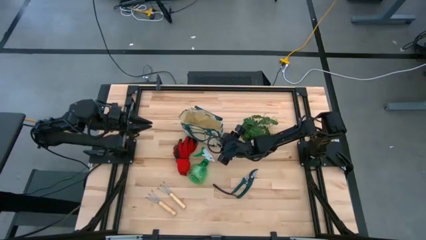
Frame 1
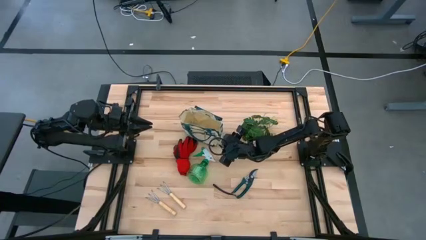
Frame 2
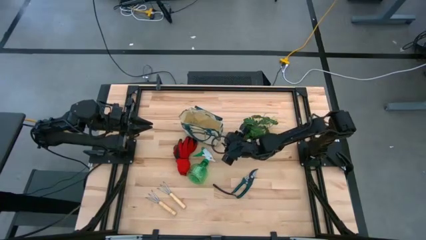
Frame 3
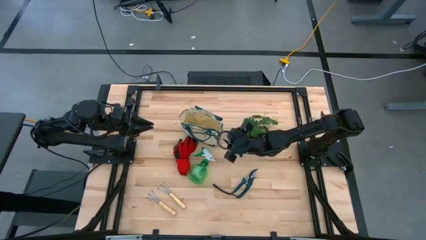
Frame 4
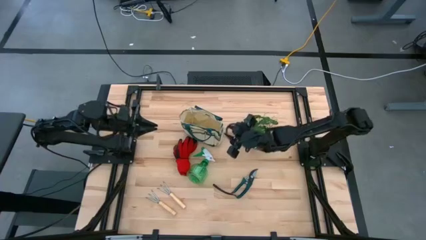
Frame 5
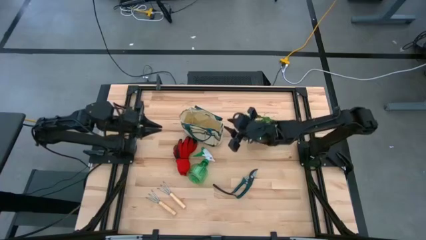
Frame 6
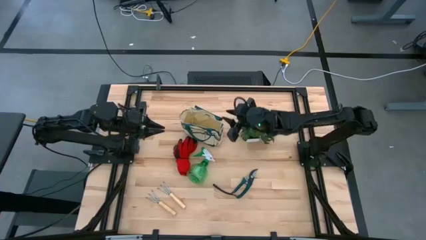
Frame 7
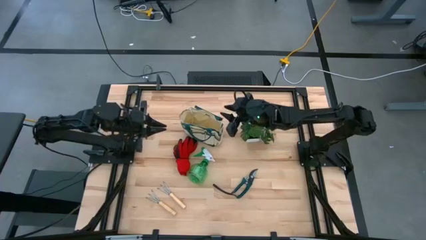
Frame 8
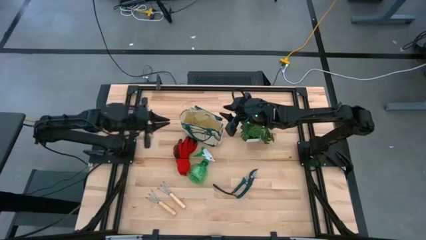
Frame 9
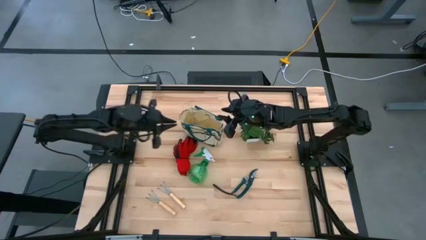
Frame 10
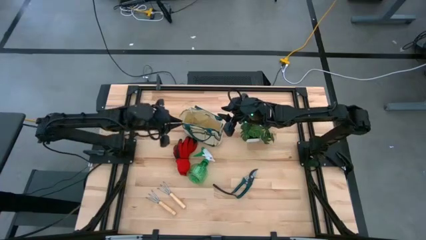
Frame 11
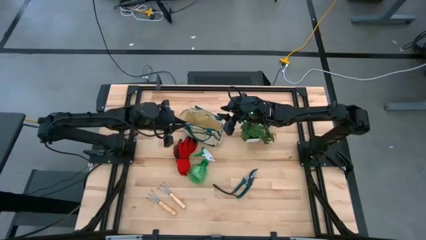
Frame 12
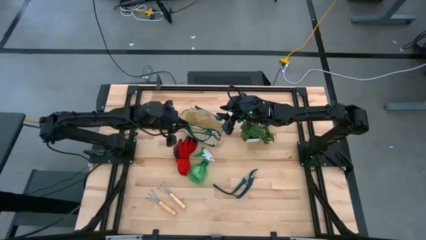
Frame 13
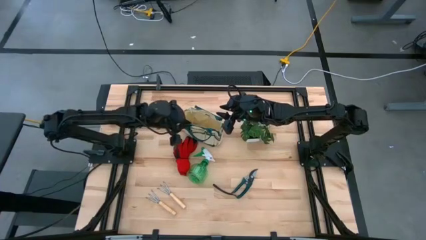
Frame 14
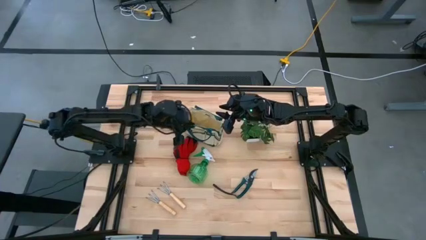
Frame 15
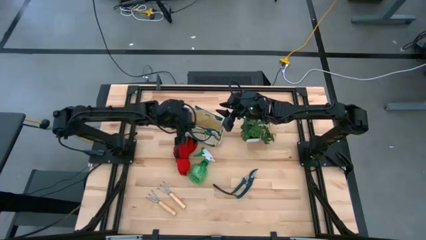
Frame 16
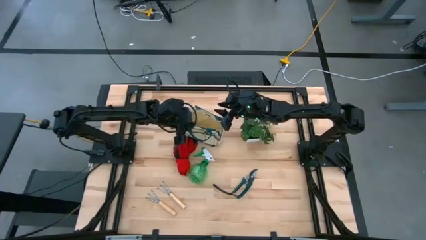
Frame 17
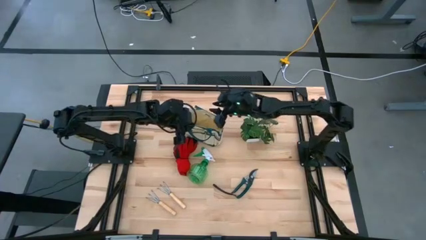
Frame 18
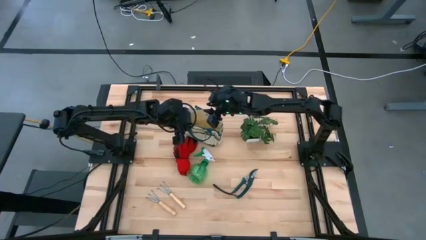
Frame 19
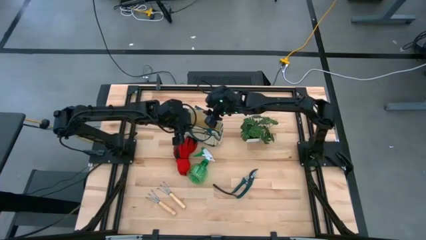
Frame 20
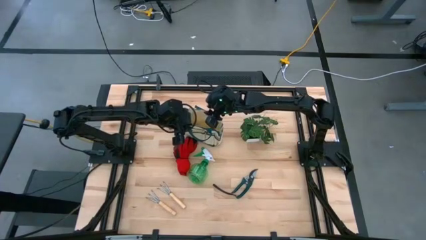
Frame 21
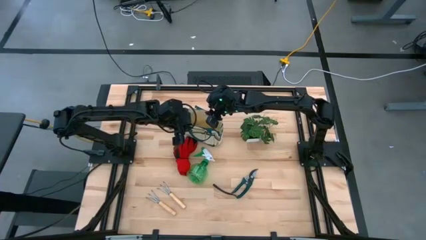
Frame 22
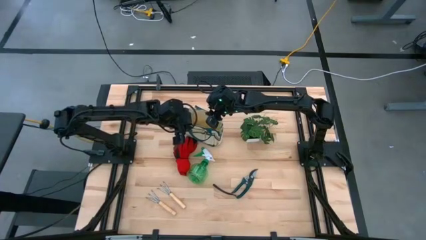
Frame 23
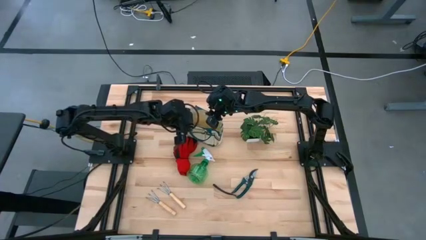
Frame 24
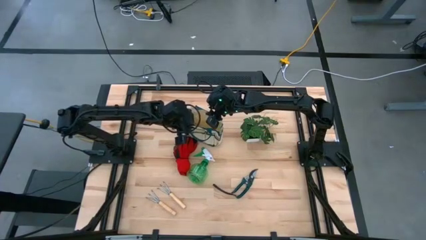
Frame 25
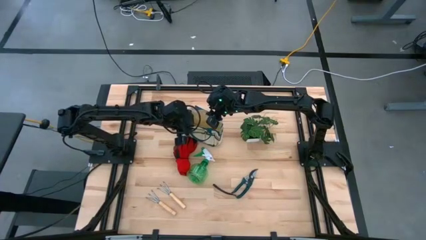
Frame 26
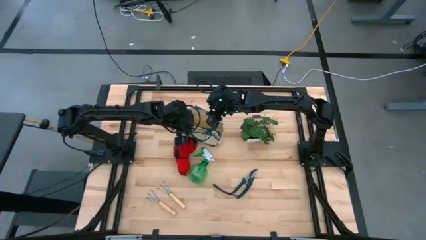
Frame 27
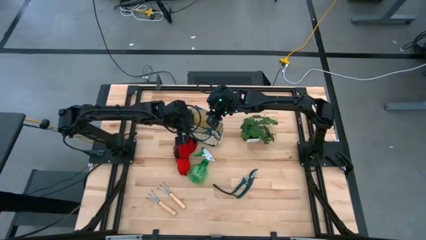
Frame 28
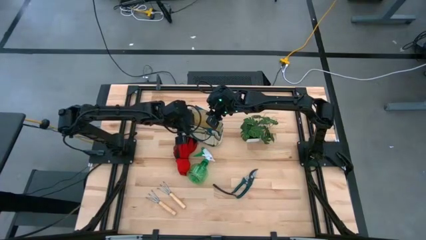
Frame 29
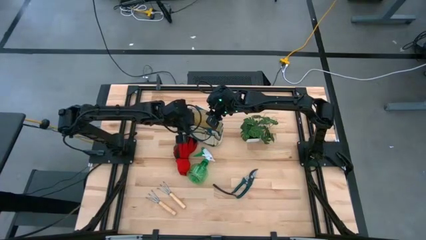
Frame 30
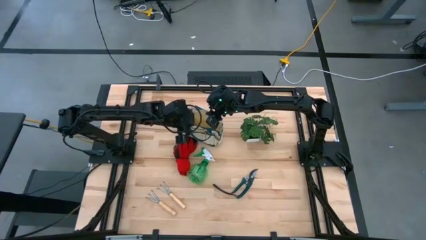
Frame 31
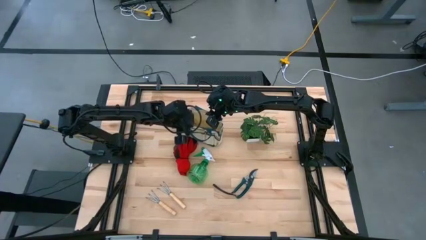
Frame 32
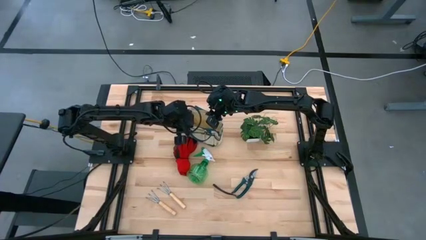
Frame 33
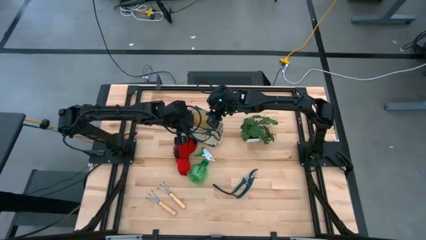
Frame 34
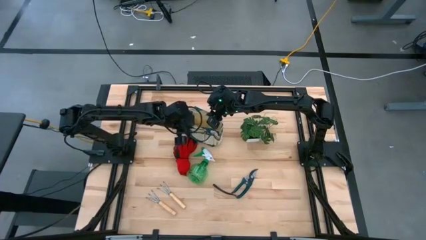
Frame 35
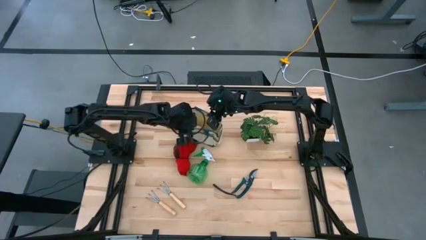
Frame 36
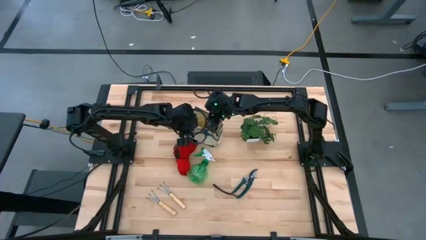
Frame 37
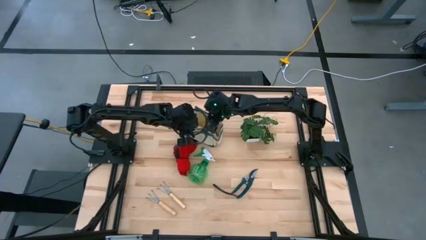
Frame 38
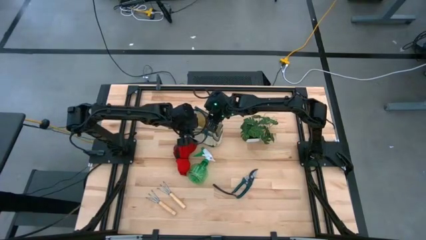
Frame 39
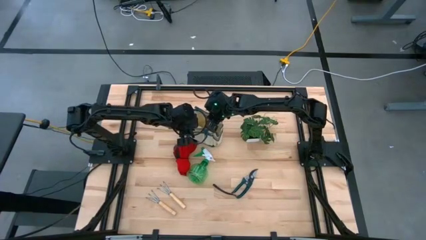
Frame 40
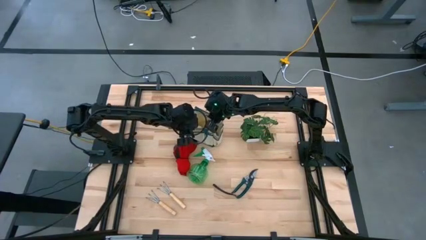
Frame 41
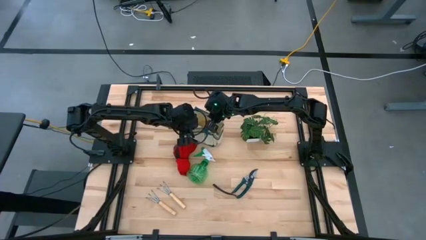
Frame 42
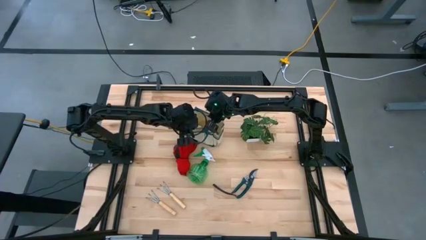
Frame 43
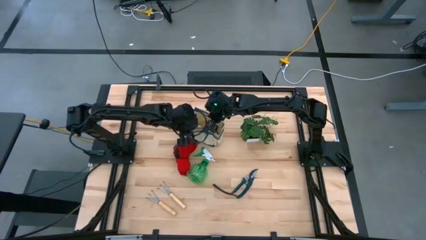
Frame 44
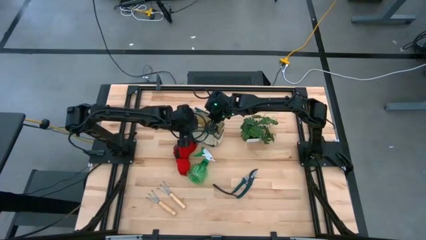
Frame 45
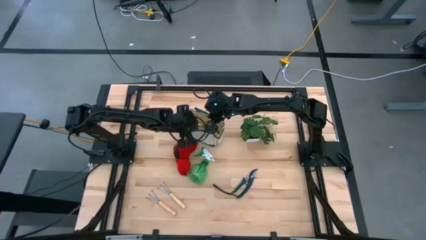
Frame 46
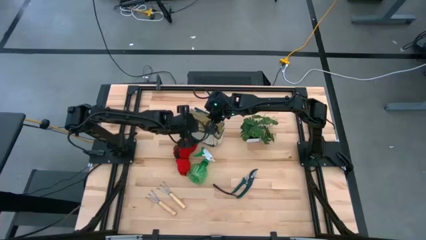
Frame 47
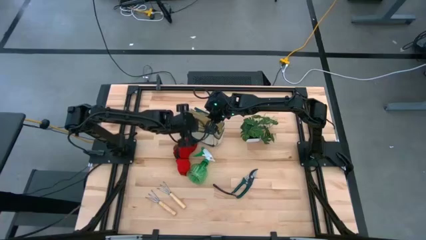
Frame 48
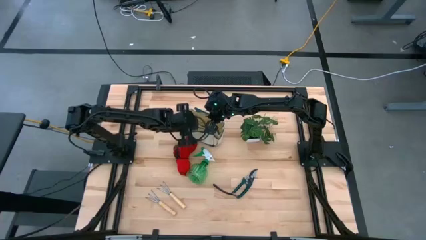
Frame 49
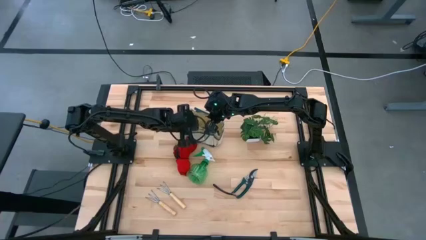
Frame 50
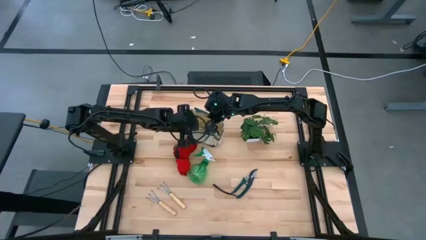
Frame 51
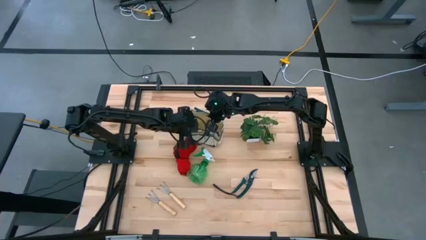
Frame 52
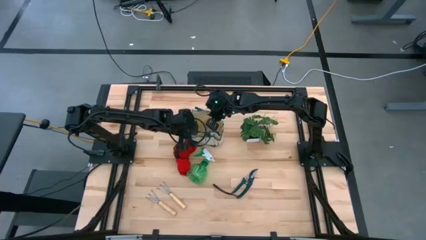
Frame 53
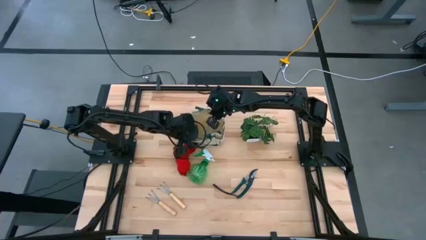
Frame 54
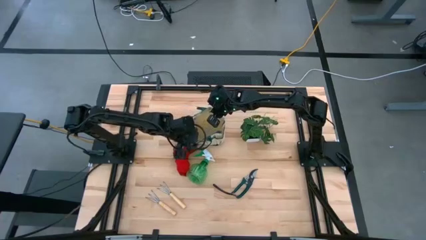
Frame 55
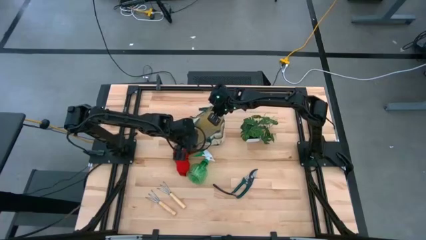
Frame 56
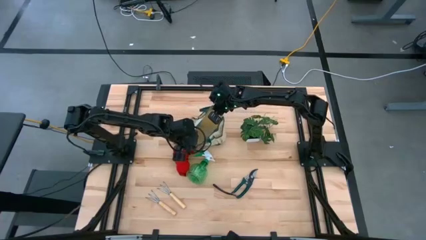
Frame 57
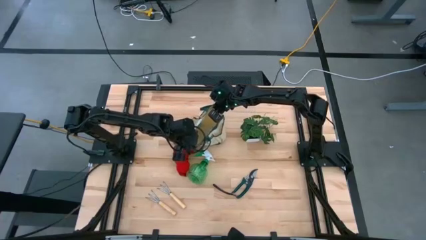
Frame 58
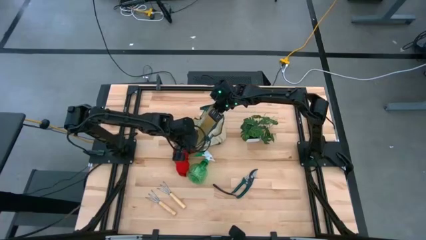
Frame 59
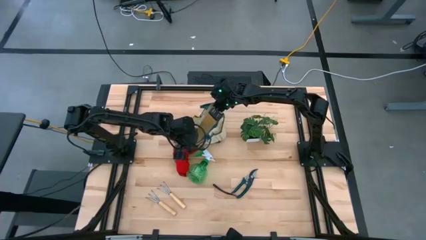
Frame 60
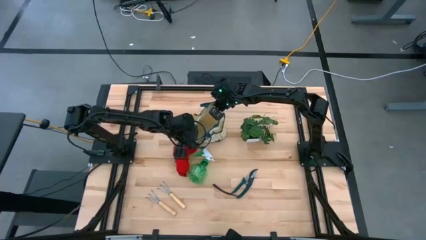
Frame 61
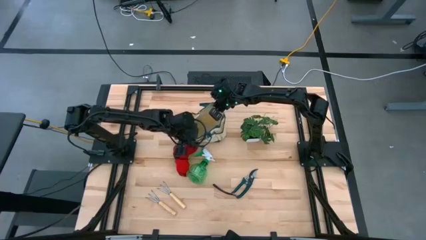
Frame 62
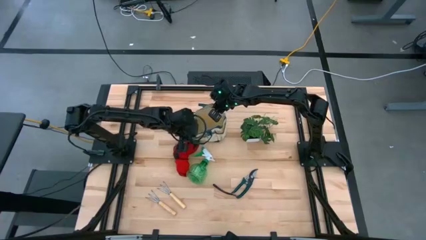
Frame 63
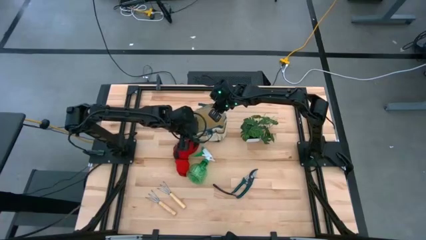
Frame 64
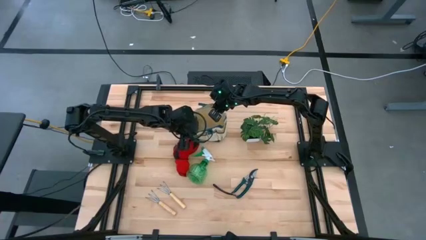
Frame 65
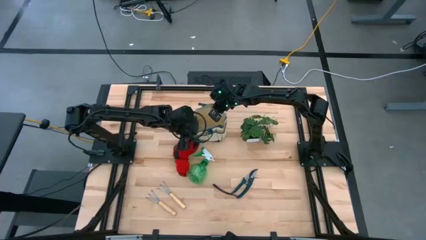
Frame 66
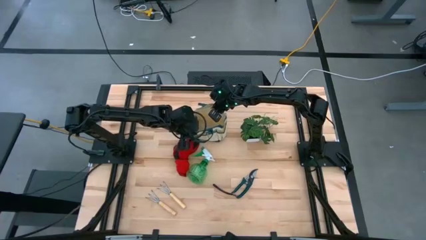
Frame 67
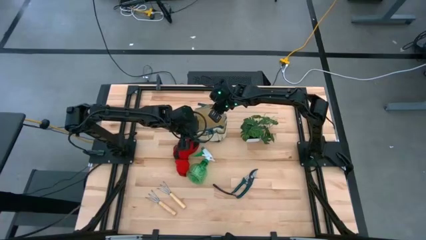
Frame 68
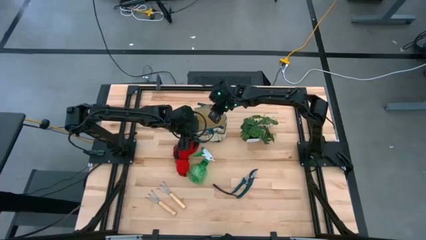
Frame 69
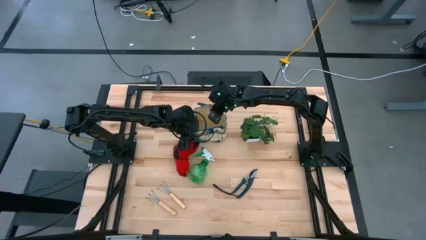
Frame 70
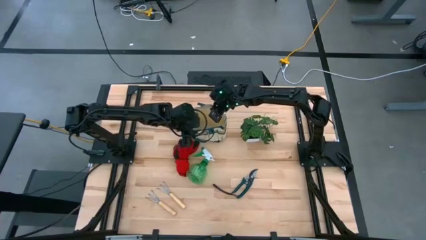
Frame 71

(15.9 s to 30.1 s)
Task: Pick & Place Garden tools in Gardening bag
Prepare the green gardening bag
